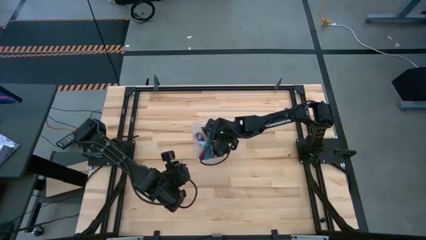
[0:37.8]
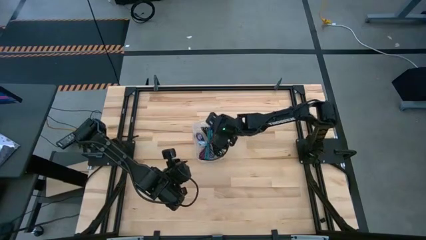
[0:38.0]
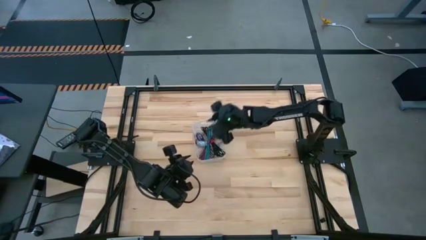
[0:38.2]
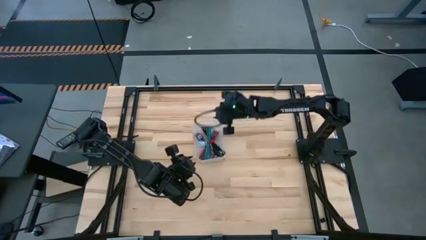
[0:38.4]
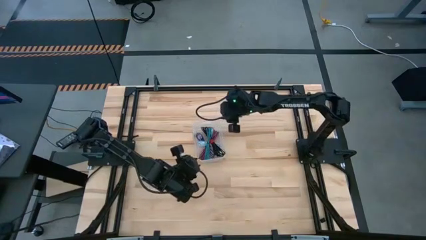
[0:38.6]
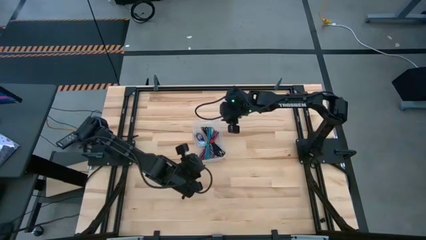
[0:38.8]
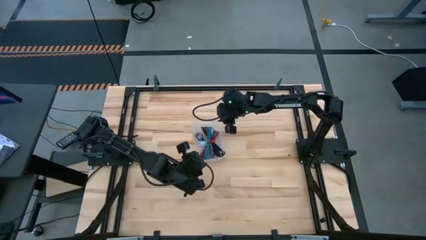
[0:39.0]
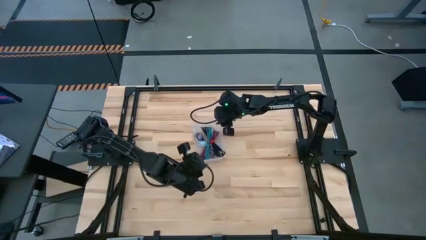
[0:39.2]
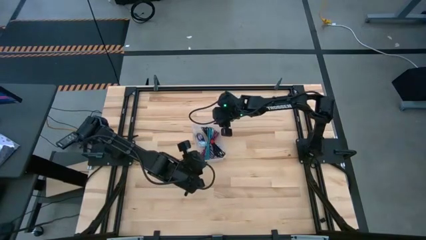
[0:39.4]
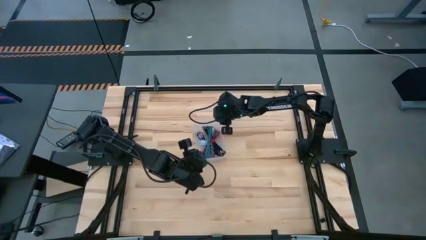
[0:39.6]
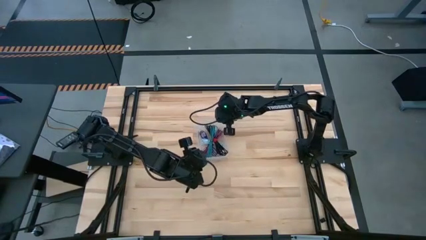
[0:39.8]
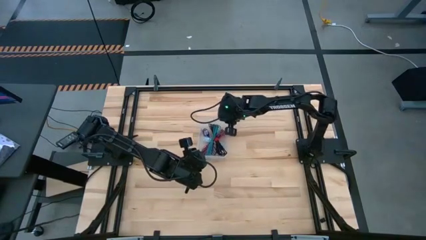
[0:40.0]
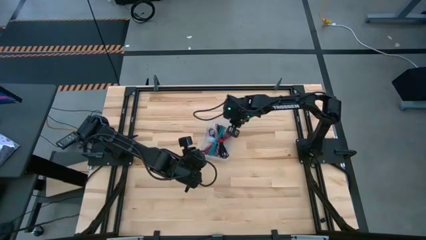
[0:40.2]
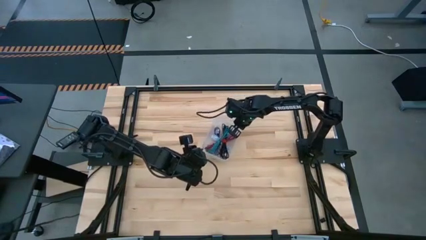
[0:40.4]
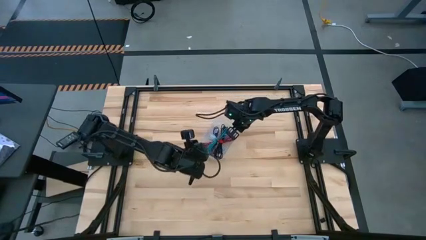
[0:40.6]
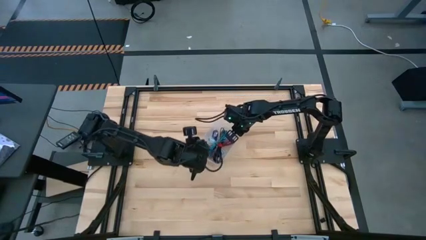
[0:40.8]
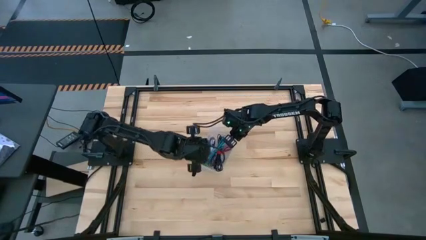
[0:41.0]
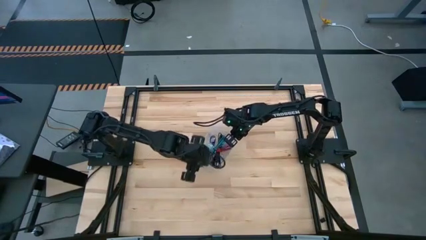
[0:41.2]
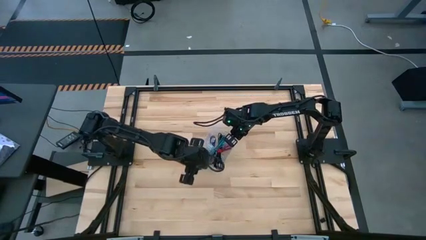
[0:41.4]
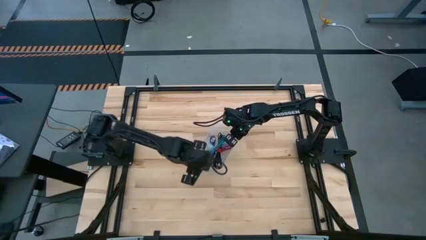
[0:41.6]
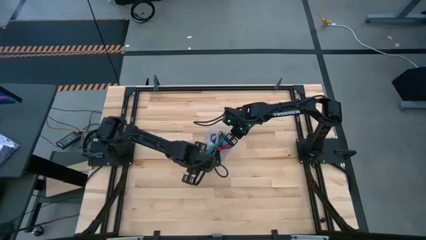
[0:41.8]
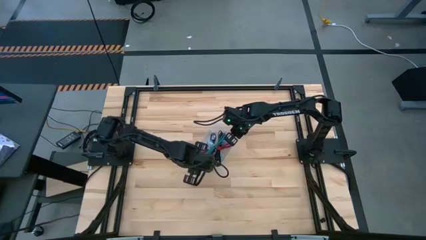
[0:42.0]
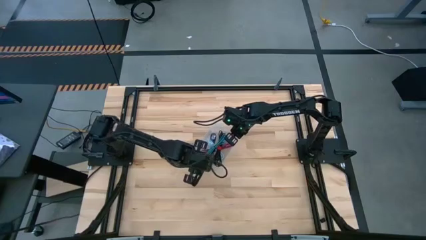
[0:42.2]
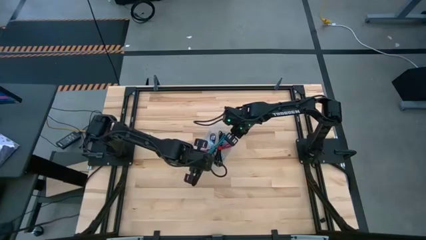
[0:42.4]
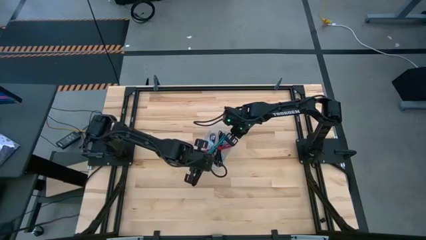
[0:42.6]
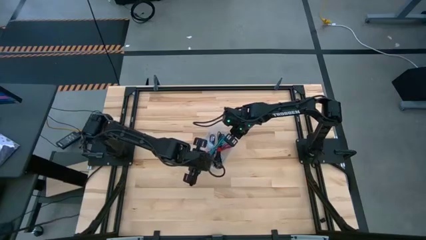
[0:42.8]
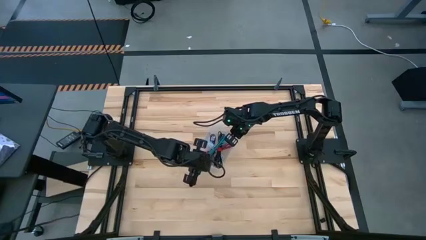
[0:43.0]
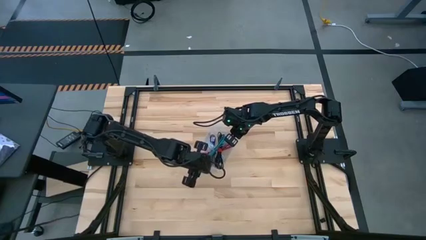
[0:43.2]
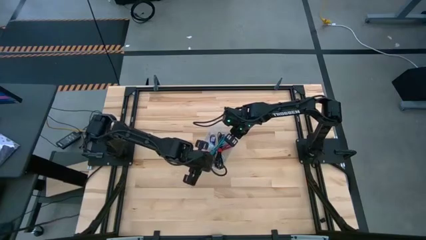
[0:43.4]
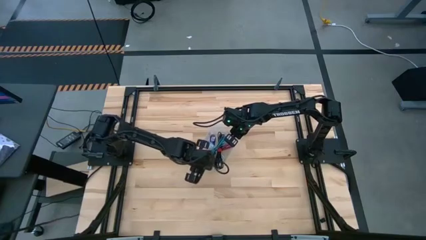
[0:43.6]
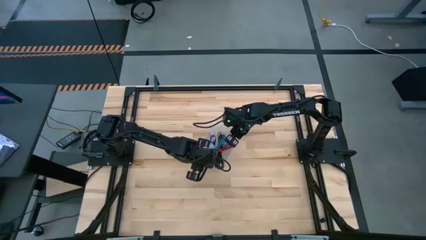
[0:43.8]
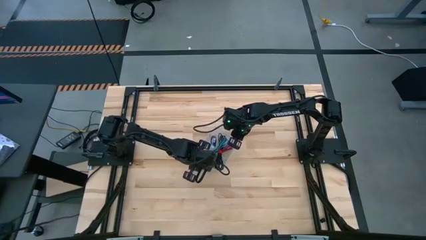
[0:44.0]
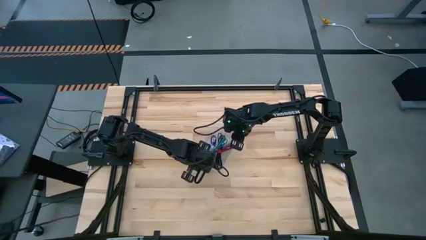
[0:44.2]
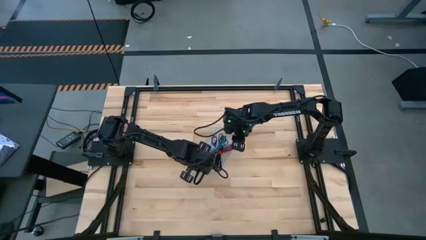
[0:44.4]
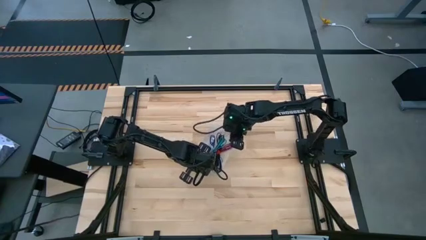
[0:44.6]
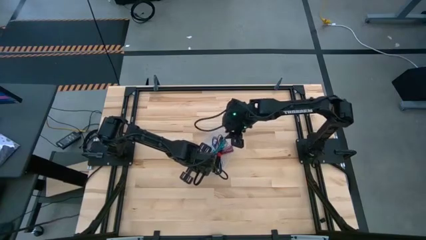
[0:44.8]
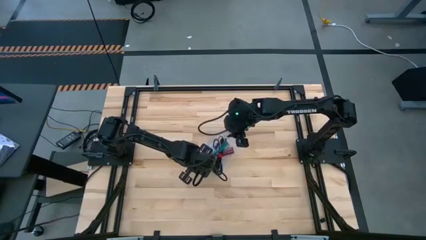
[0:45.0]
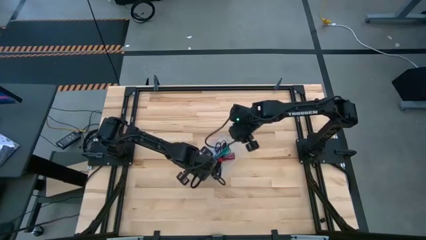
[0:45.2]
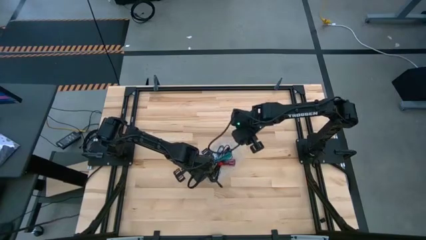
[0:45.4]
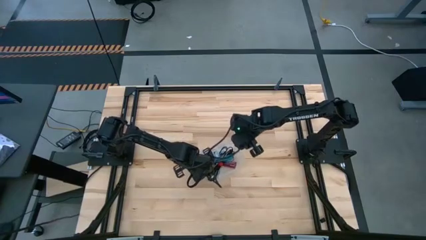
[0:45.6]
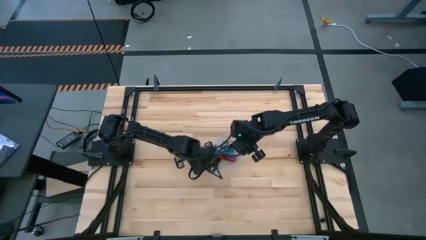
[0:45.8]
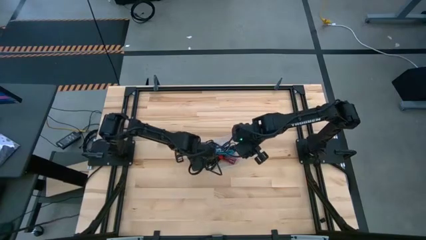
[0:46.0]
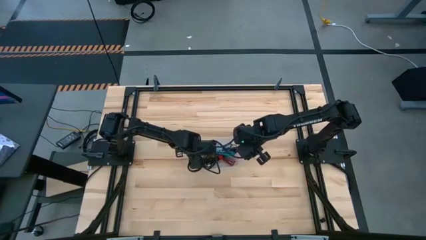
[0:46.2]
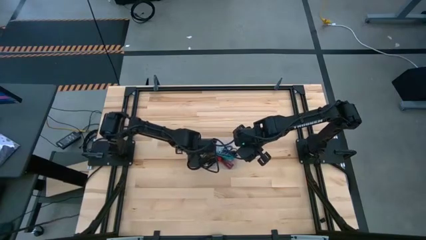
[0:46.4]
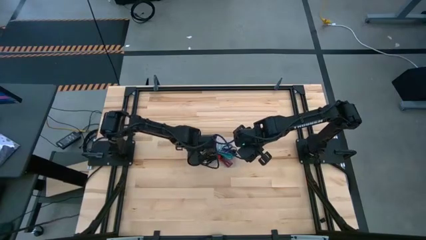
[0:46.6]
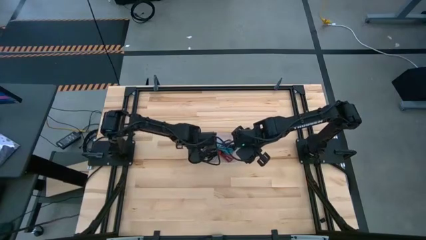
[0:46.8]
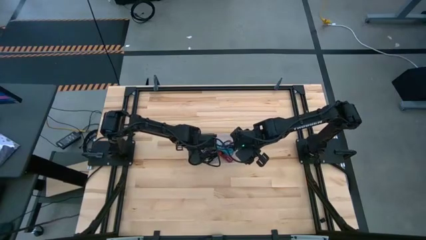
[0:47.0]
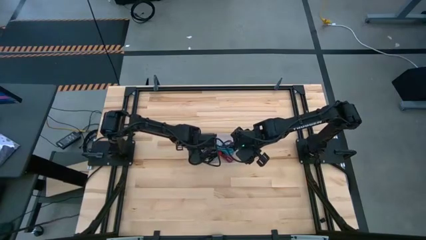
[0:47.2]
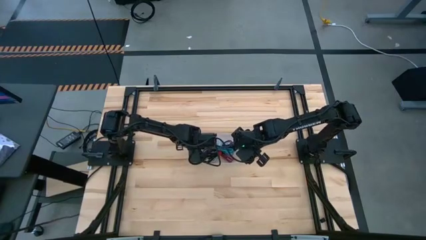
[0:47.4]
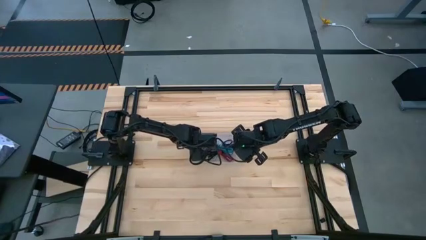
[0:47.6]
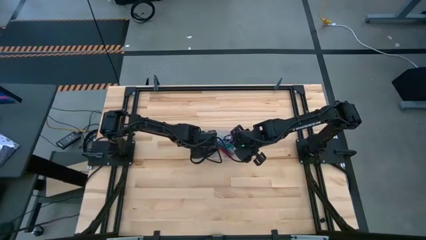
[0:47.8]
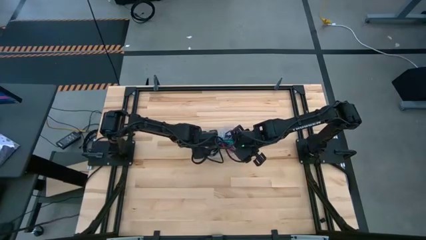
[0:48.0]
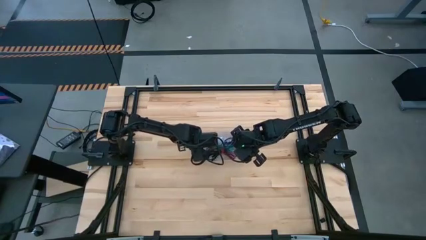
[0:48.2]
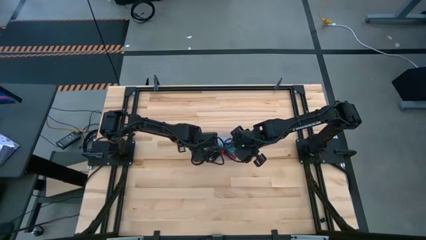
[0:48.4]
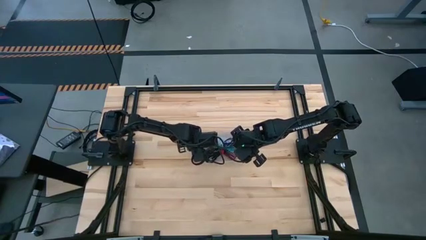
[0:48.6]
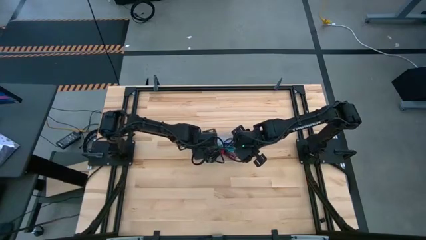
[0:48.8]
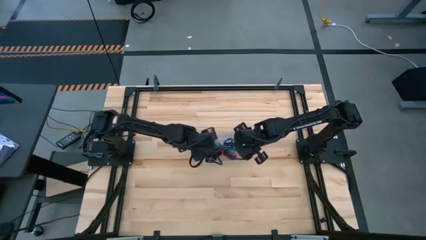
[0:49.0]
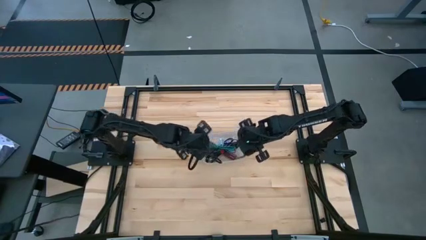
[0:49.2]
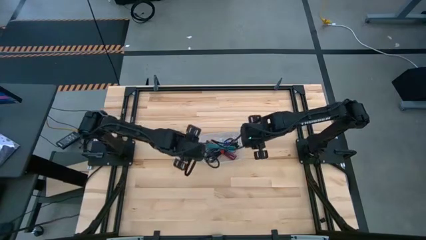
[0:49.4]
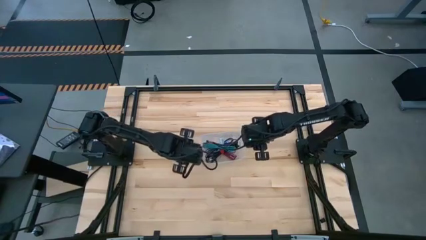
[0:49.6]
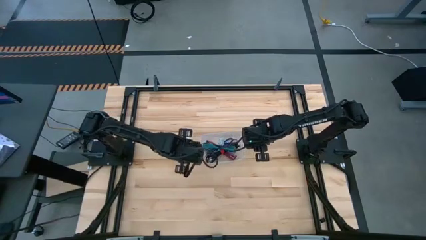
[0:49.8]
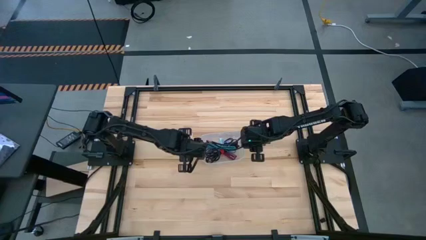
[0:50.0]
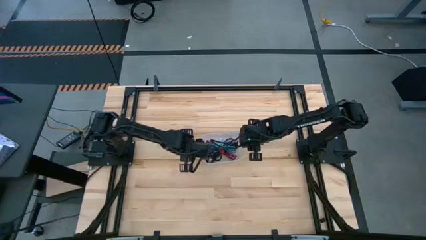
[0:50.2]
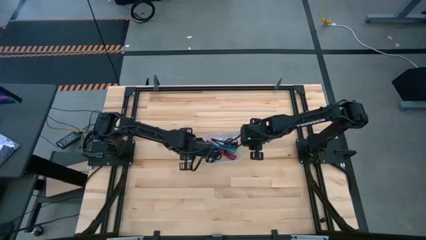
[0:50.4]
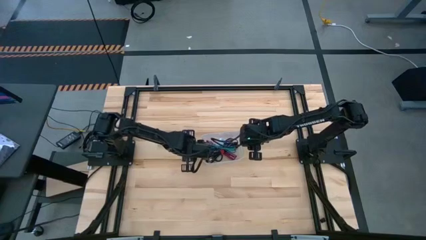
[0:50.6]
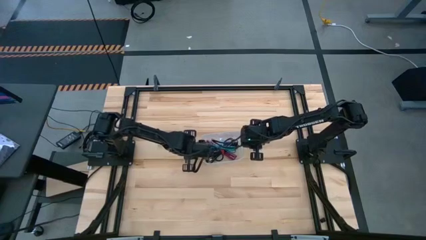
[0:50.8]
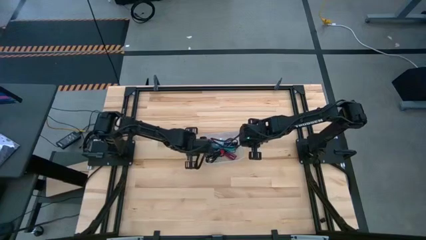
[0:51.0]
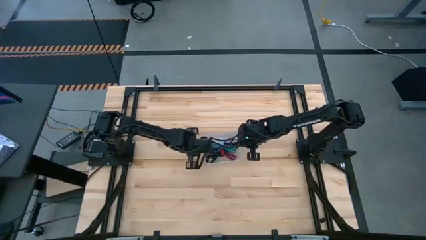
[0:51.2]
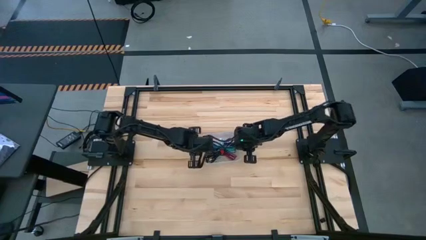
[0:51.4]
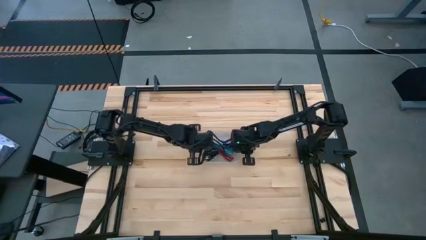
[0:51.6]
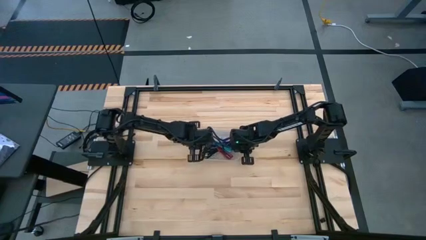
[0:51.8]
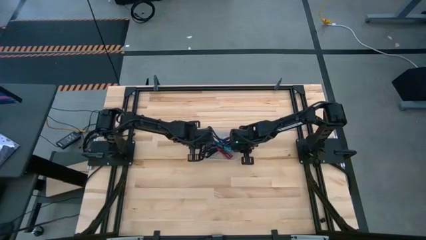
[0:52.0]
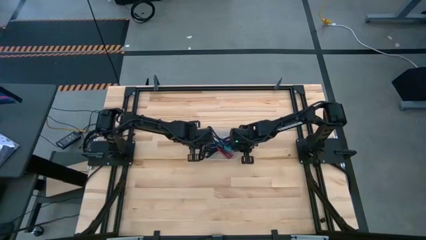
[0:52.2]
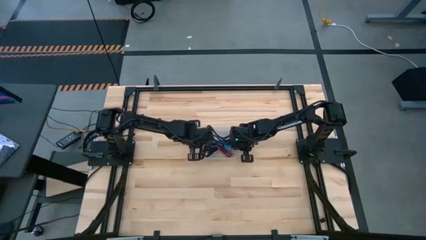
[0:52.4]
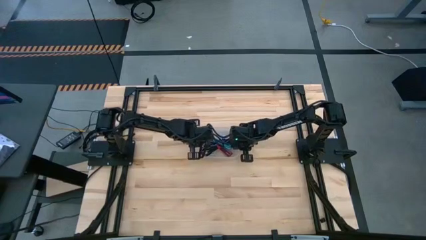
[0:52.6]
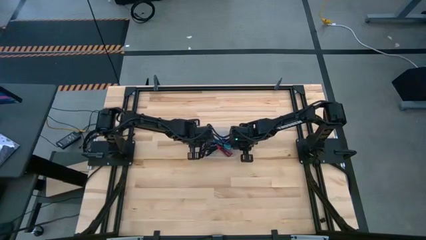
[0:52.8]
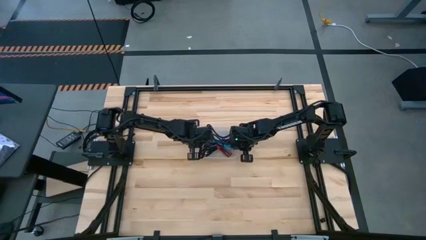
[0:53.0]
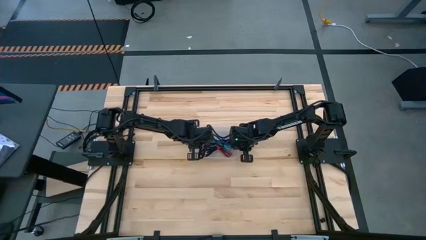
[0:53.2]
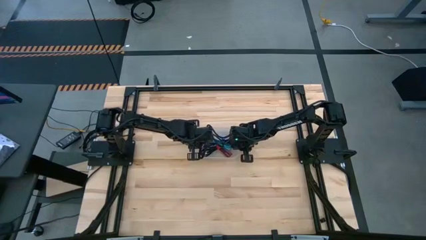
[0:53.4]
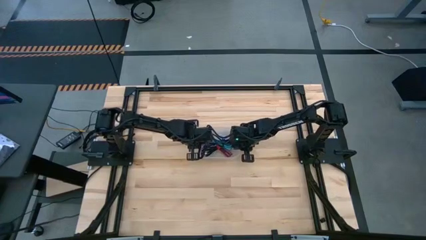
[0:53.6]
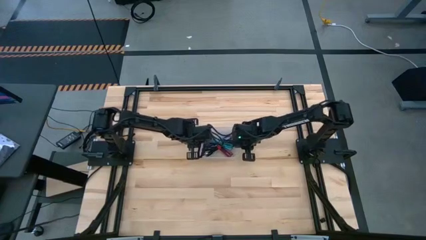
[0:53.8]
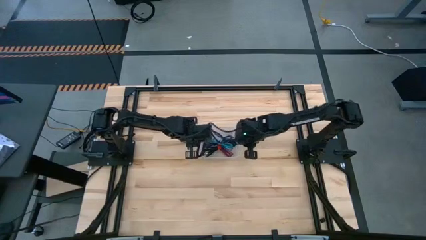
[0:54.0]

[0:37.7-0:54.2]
Task: Pick and place USB-C Cables
Adjust the white bin
